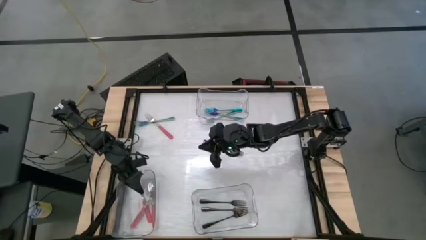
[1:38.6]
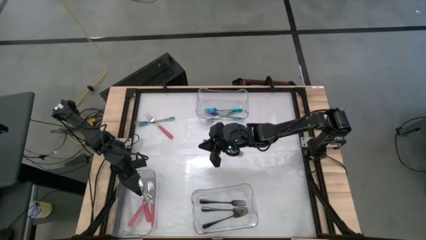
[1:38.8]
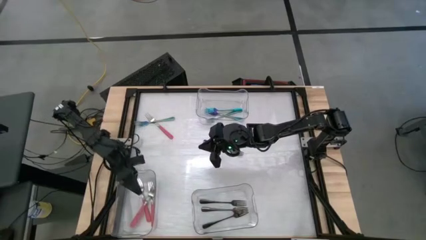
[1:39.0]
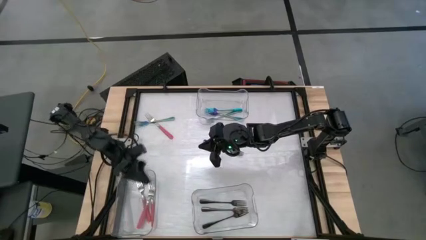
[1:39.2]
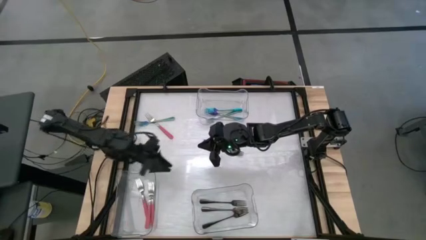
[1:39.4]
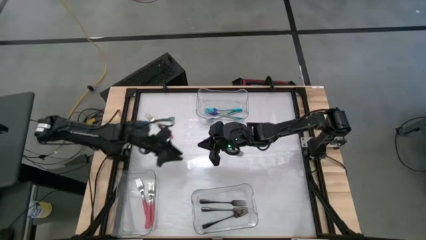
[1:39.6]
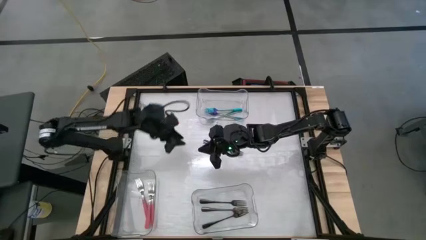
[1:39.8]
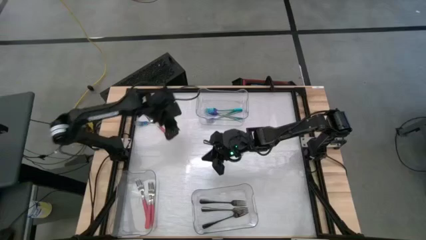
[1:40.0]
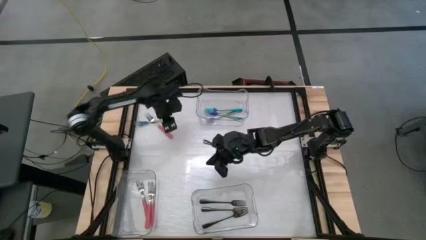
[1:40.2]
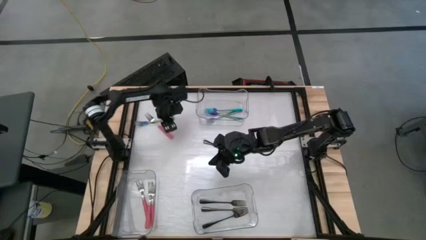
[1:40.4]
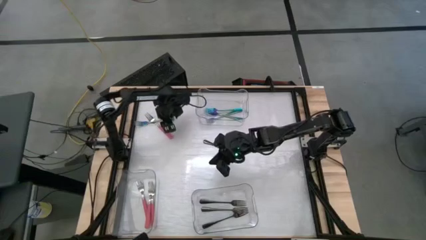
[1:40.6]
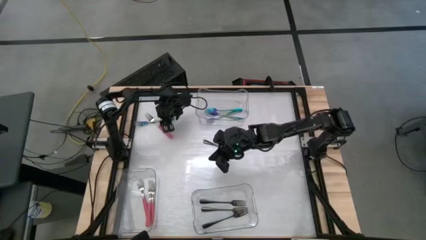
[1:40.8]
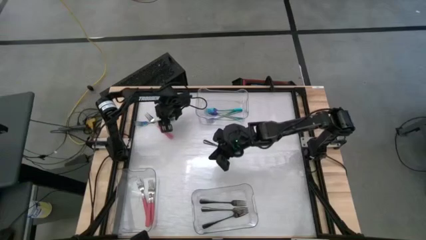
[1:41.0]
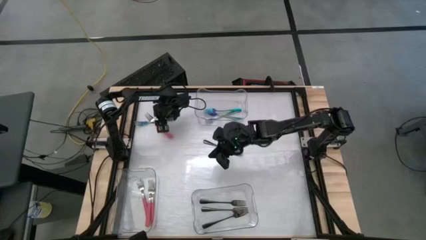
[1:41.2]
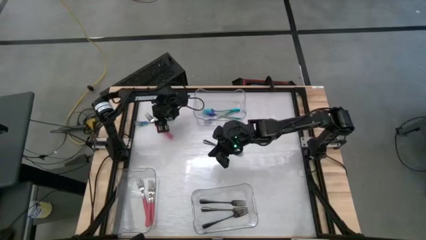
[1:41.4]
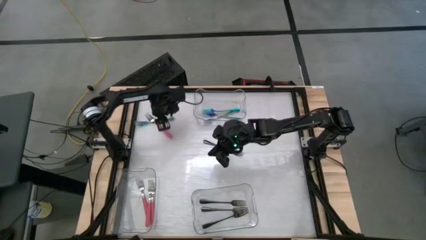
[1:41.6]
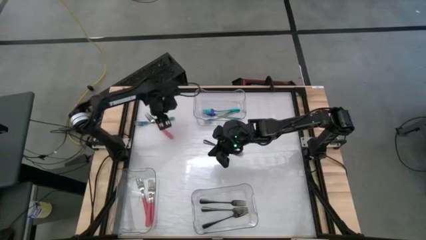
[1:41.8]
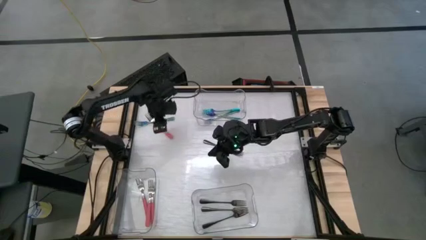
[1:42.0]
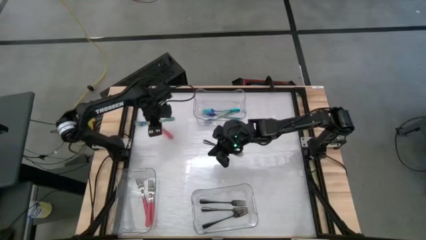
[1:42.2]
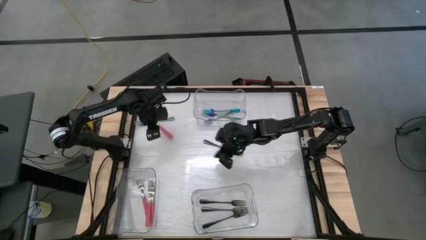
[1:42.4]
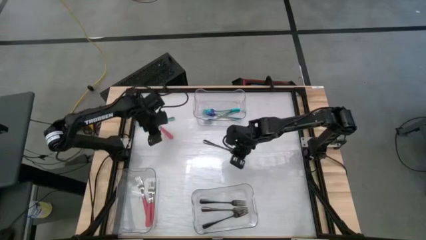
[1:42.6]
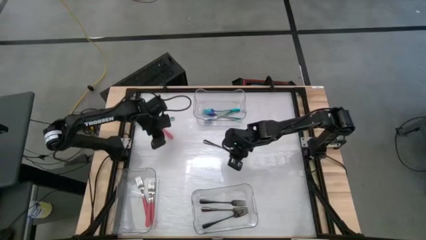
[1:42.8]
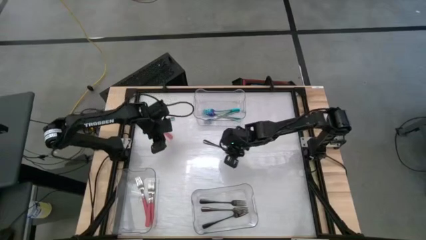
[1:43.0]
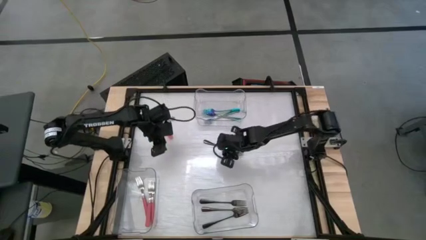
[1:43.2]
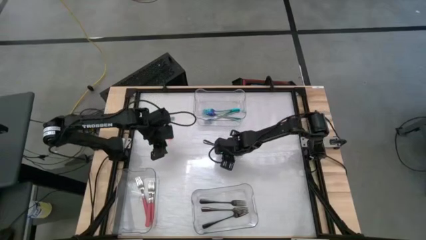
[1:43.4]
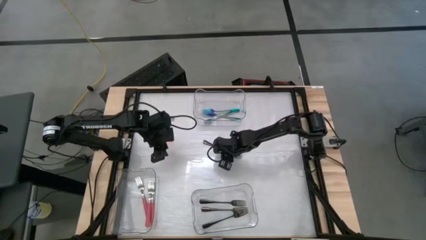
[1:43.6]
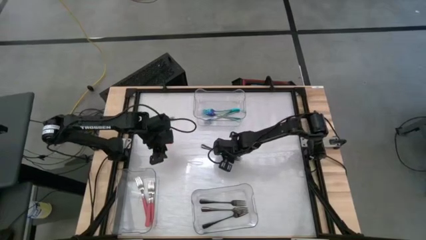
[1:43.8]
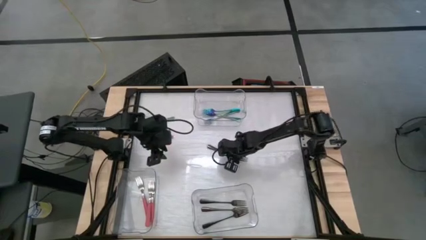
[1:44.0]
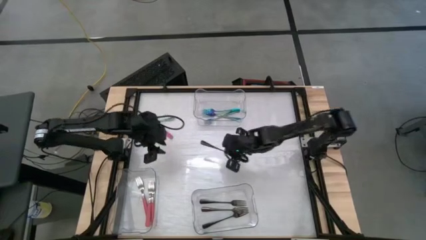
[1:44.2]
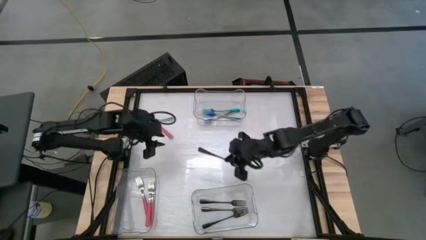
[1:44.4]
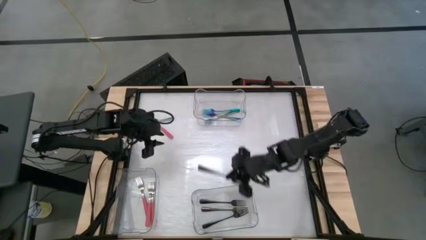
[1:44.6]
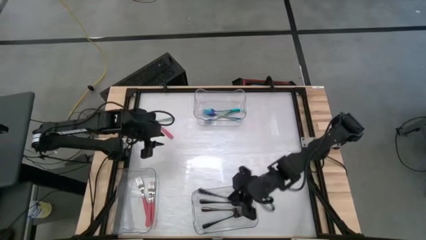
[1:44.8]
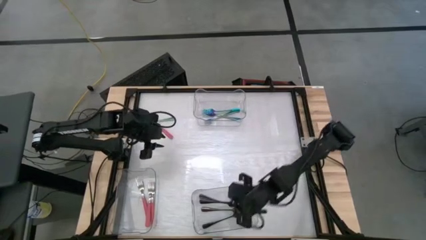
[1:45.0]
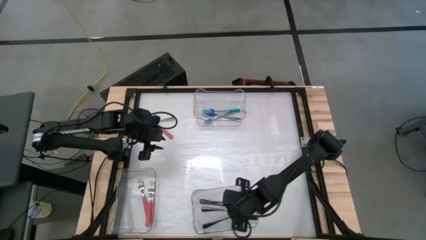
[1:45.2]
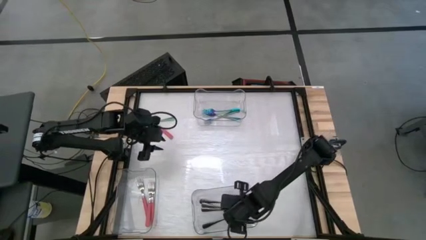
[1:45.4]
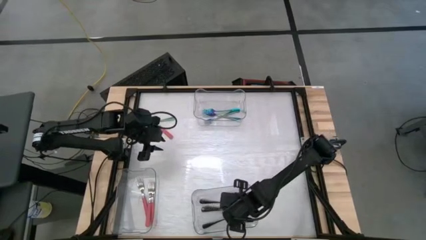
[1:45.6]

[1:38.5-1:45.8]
Task: Sort silverware by color (type)
Put the black fork into the bottom right transparent bin

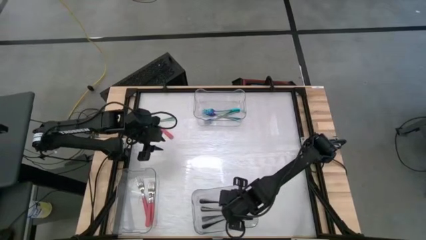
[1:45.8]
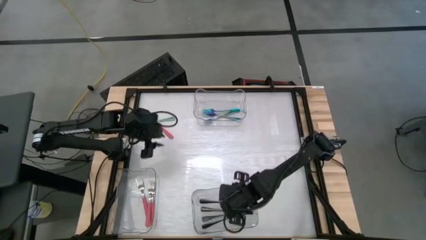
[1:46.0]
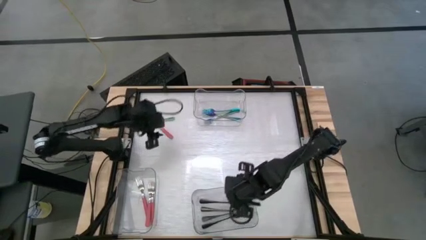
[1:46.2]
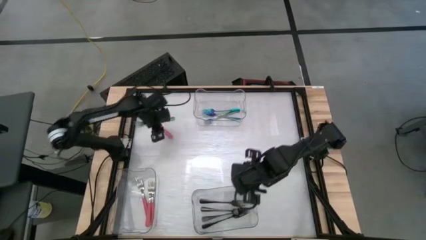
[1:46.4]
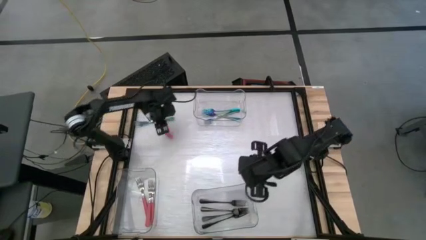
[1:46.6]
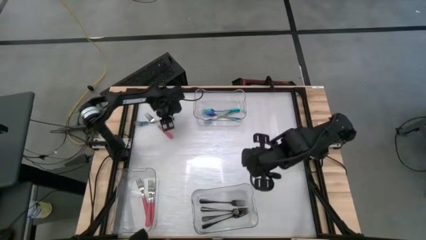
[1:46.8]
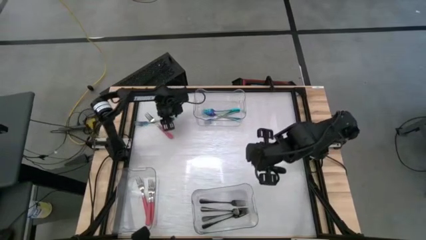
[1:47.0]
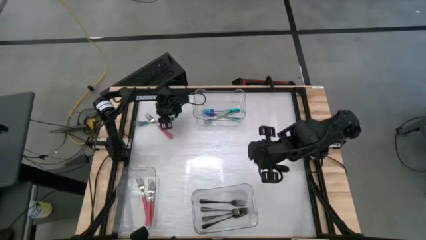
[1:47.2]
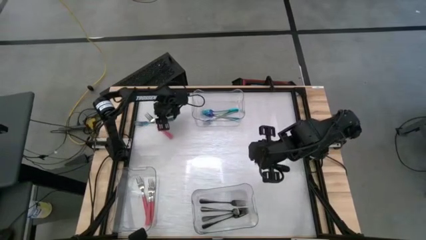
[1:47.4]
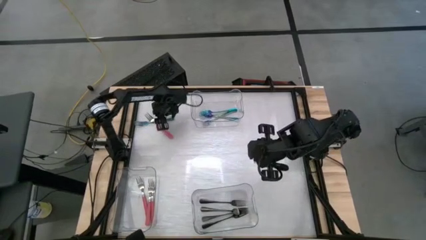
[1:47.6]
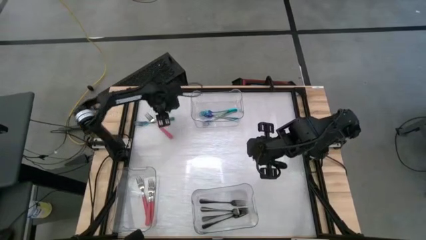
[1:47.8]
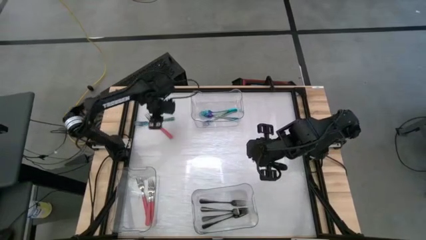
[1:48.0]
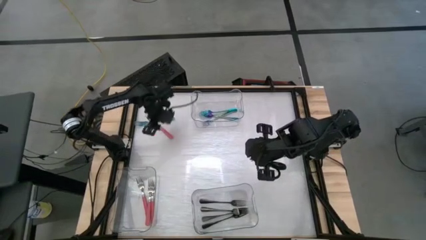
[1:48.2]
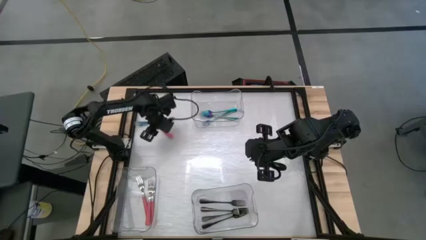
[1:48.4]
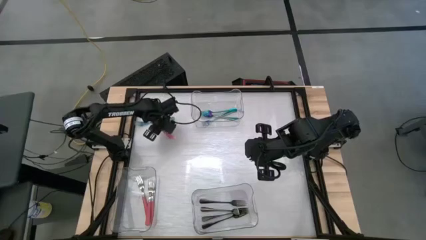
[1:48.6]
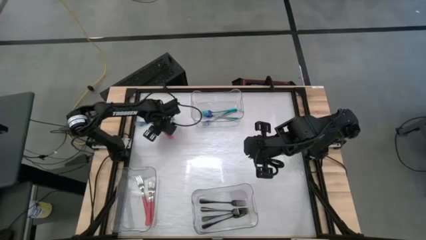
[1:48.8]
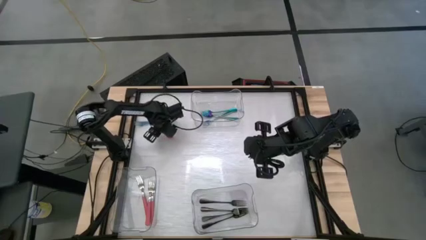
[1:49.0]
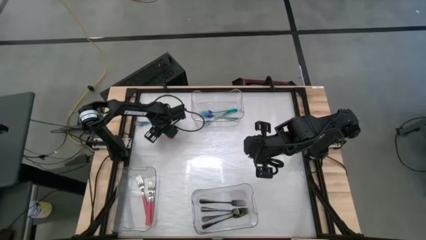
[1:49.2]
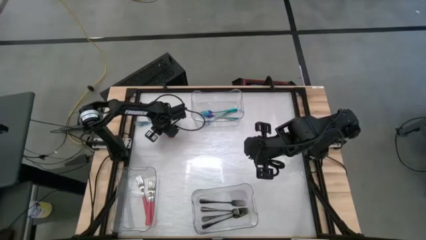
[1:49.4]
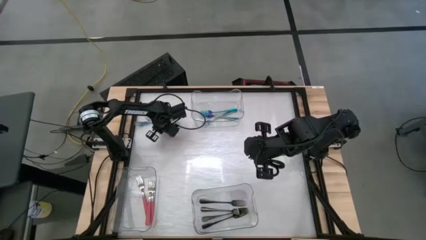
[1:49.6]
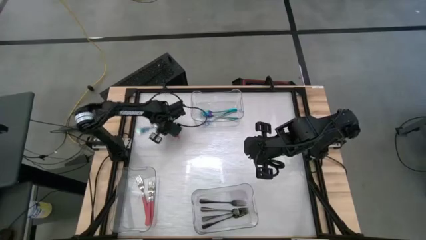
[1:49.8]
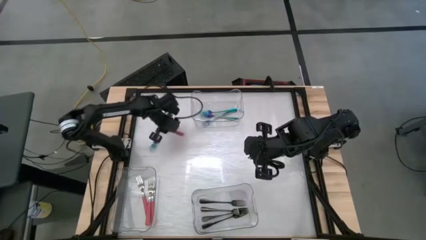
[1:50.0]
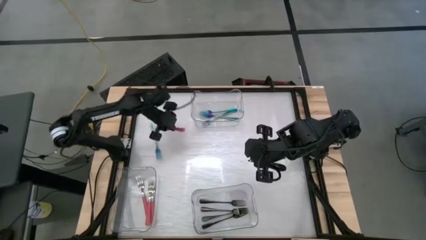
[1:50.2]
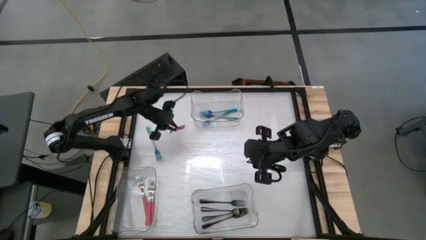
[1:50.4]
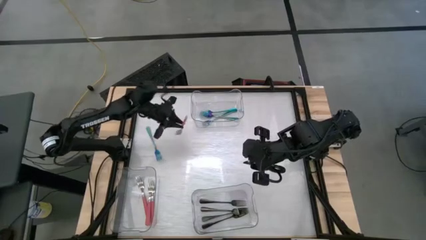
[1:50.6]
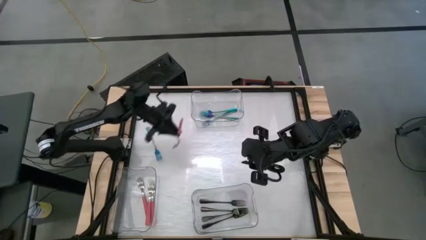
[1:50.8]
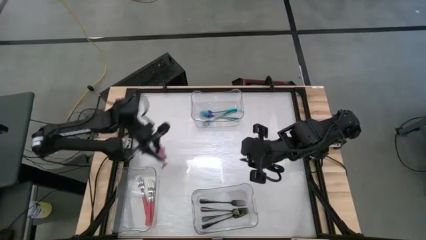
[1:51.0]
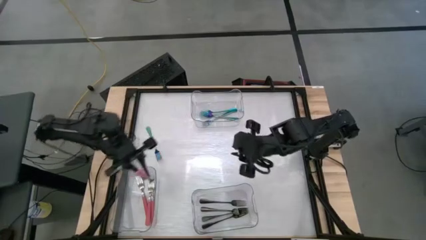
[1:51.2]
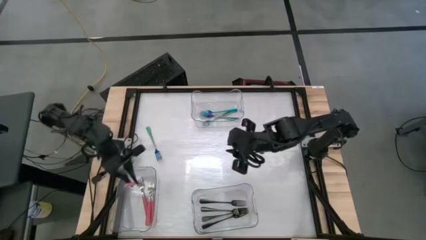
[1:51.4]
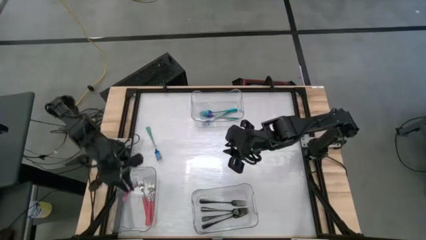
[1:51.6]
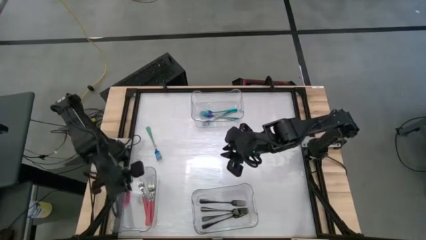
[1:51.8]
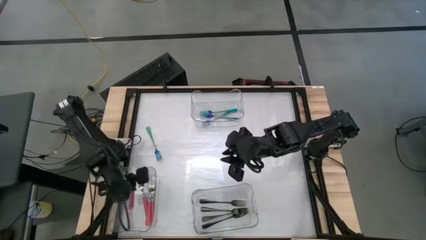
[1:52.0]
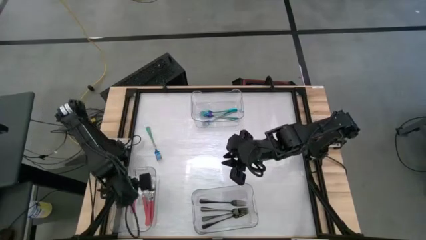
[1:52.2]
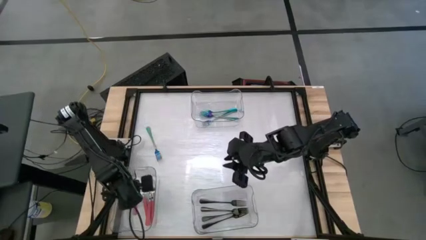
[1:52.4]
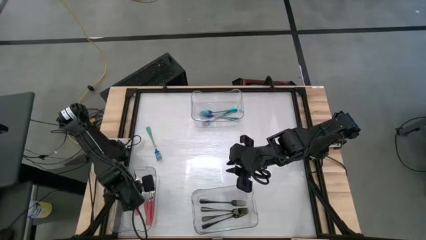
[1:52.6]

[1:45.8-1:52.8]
Put the pink fork into the bottom left transparent bin

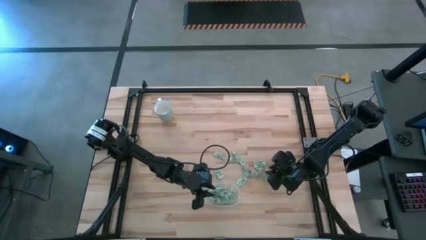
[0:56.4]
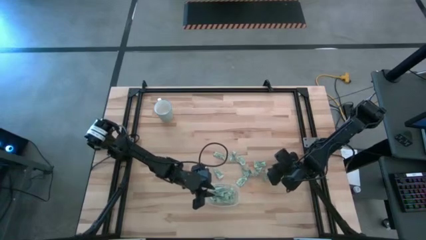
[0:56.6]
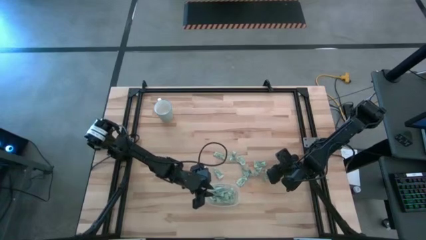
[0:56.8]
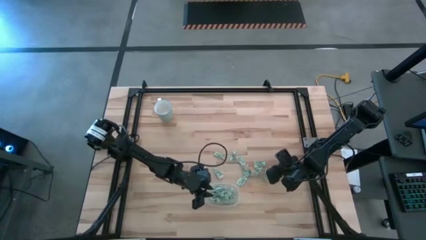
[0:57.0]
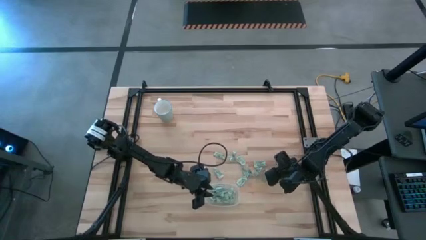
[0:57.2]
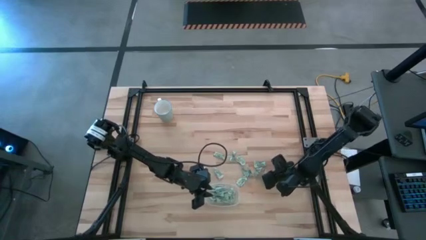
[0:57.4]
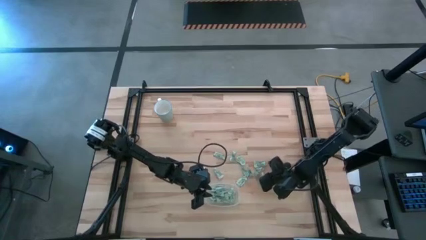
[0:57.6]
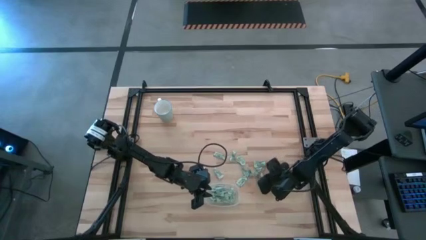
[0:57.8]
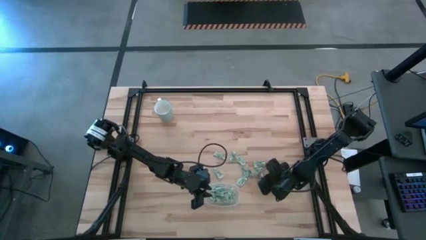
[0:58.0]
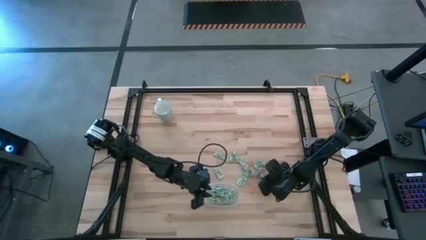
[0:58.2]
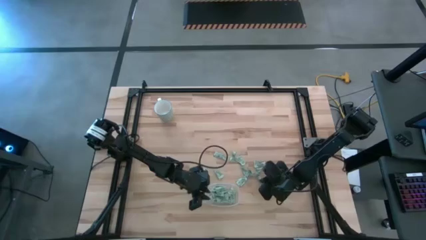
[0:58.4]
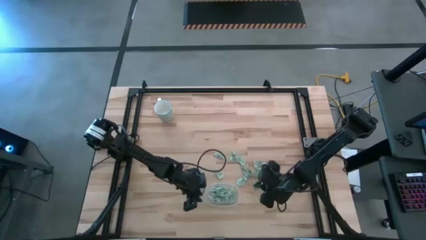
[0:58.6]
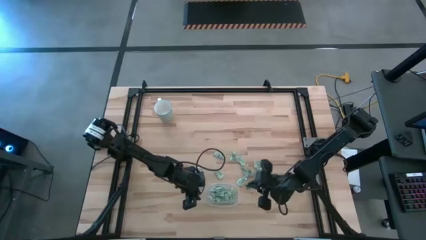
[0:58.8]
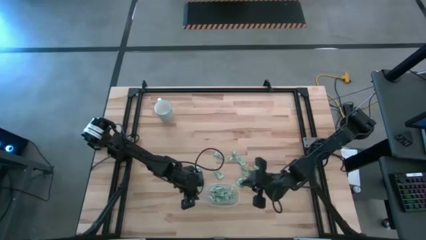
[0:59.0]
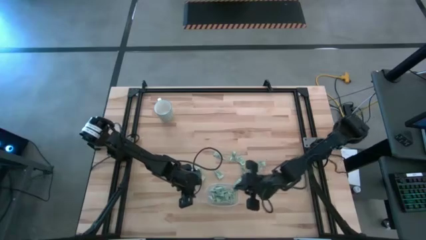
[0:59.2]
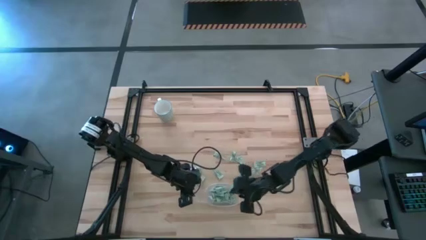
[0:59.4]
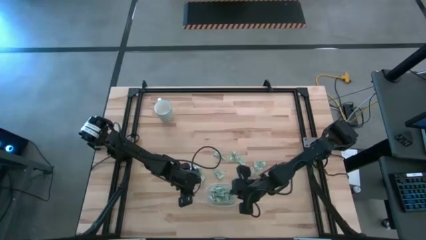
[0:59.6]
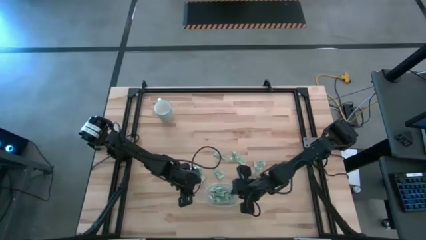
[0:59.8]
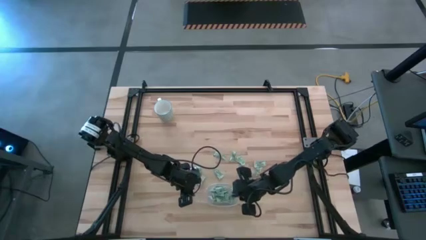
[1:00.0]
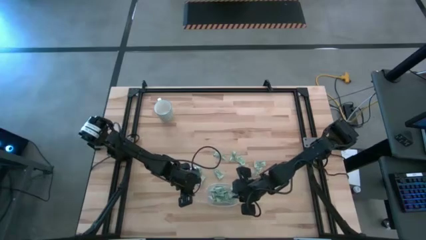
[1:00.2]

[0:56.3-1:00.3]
Task: Pick and place Stevia / Truvia into bins
Put the stevia packet into the transparent container
